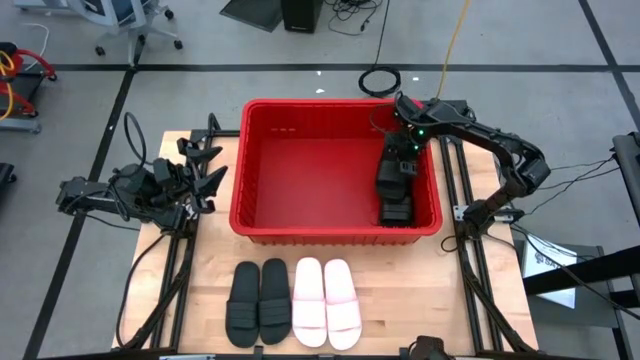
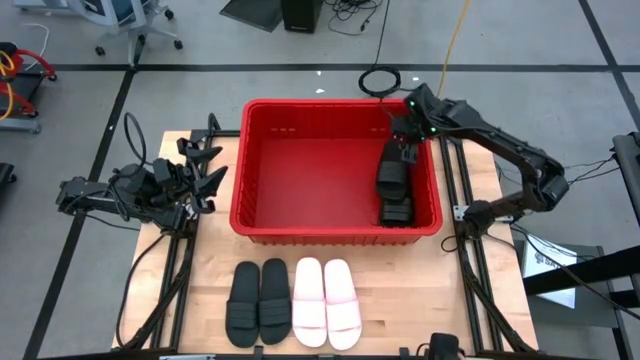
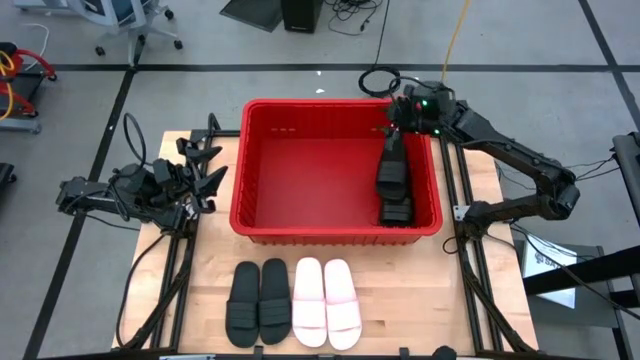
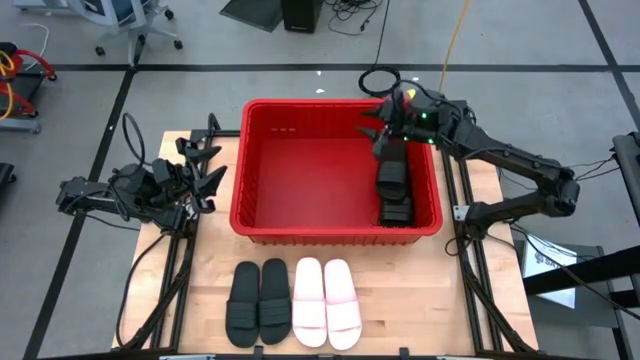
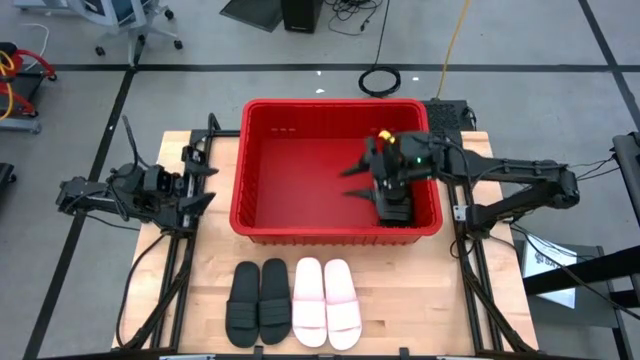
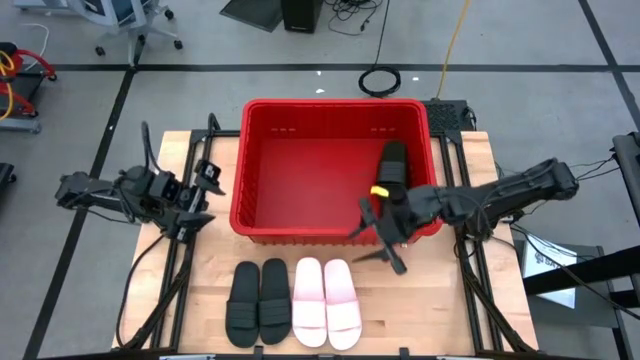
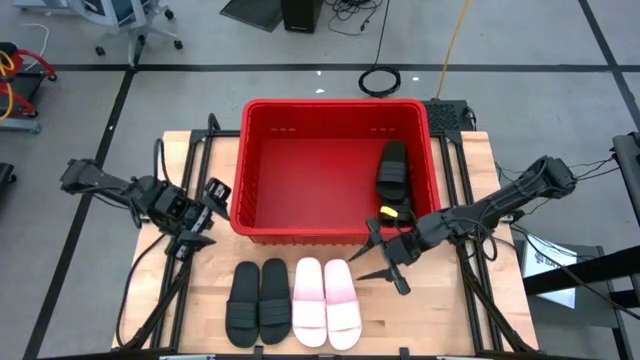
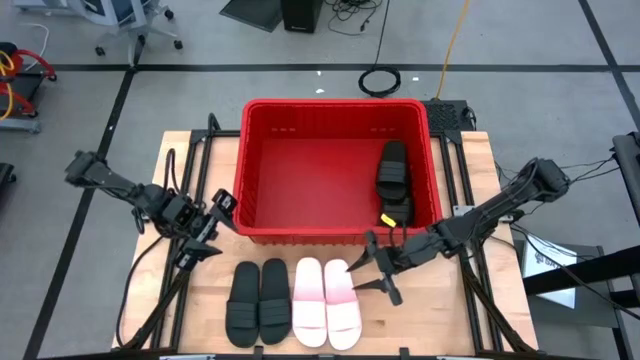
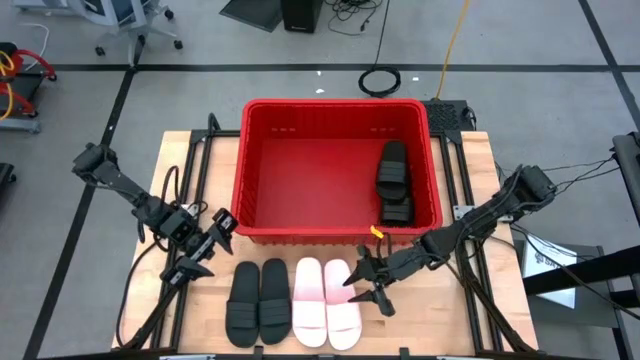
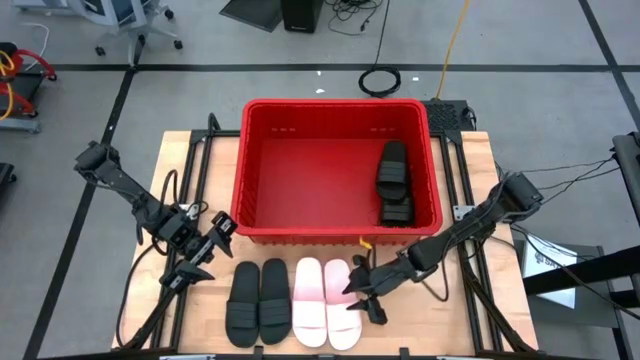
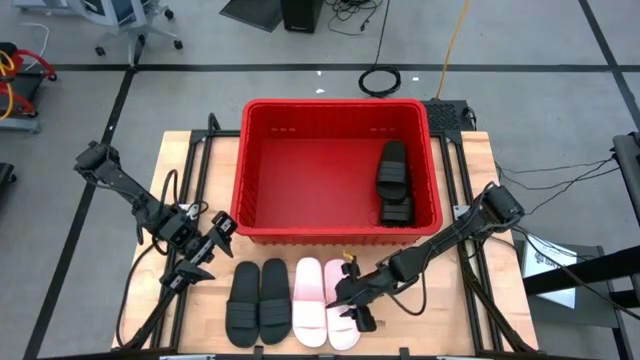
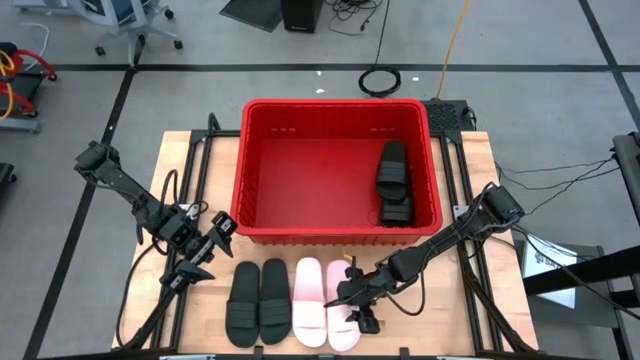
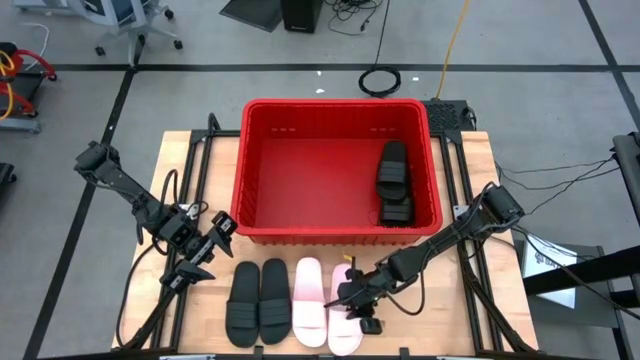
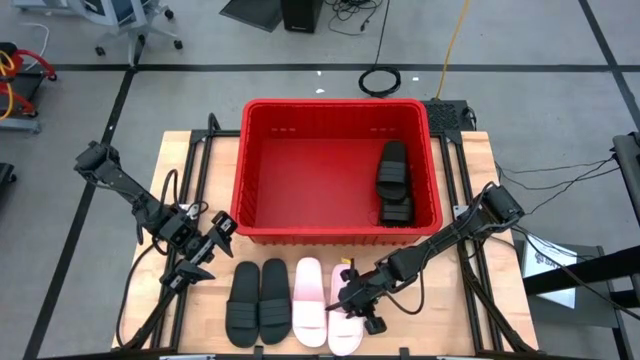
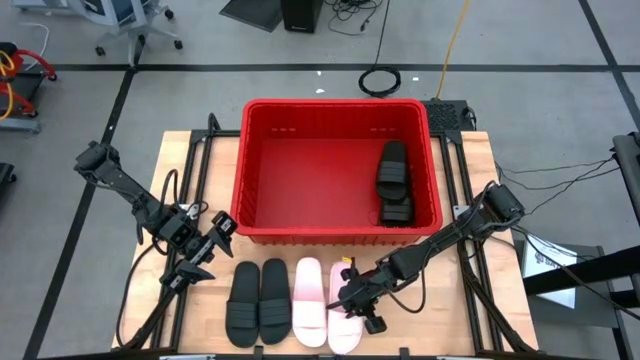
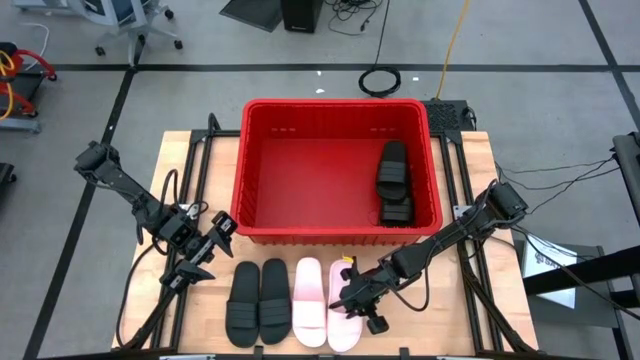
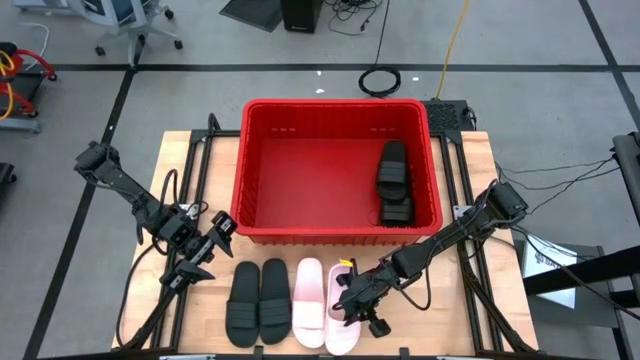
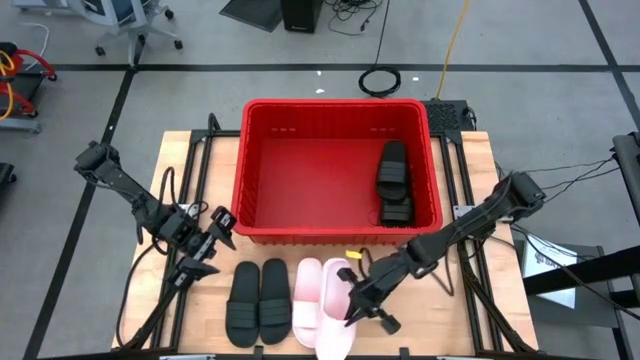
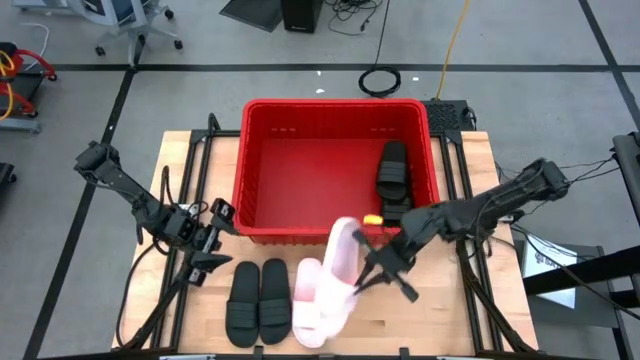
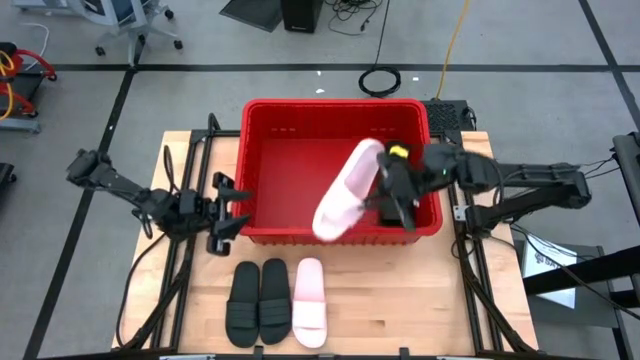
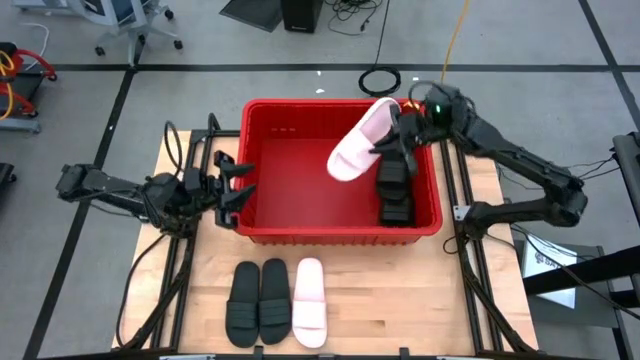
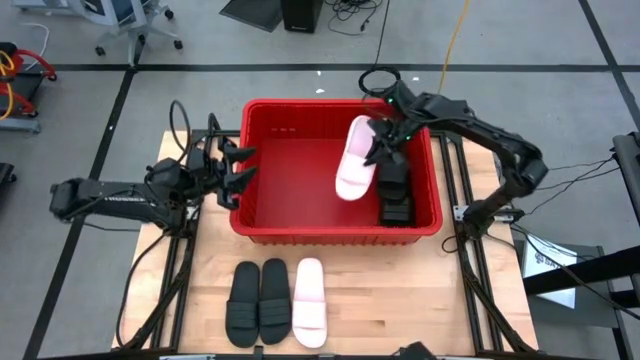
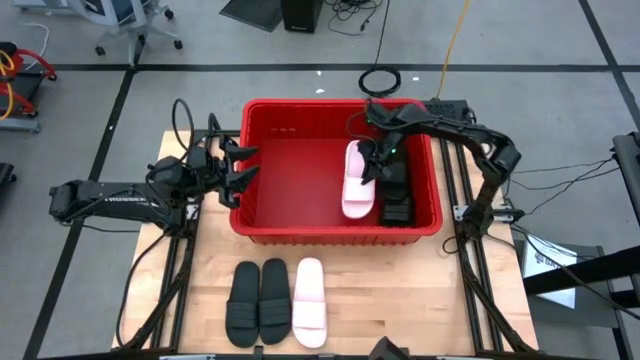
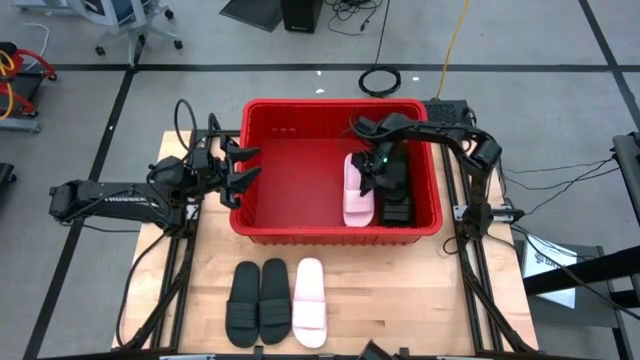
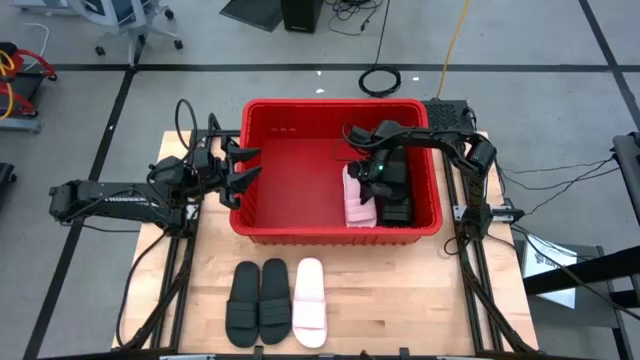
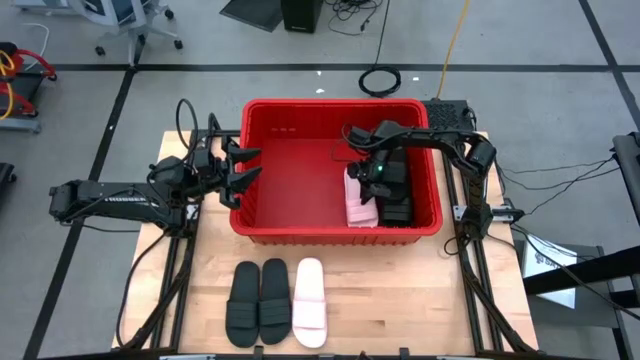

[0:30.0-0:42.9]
Task: Pick and place slides into bin
Put the right white slide into the red bin

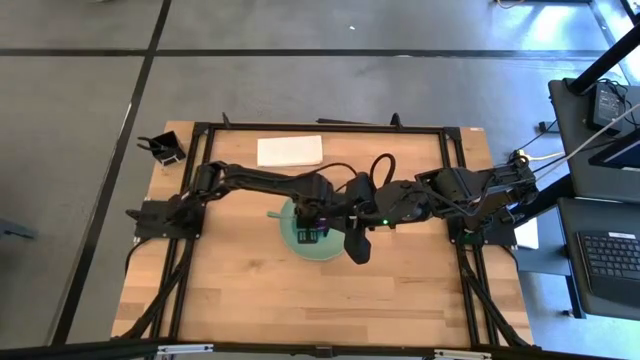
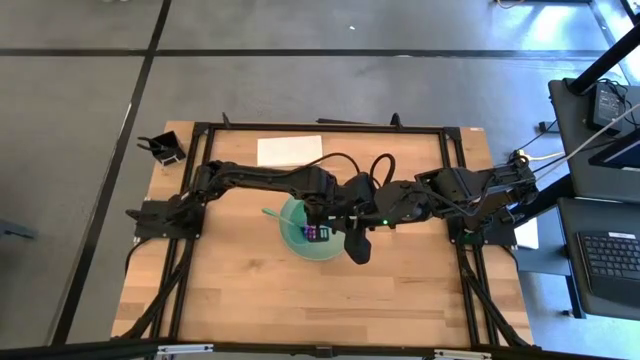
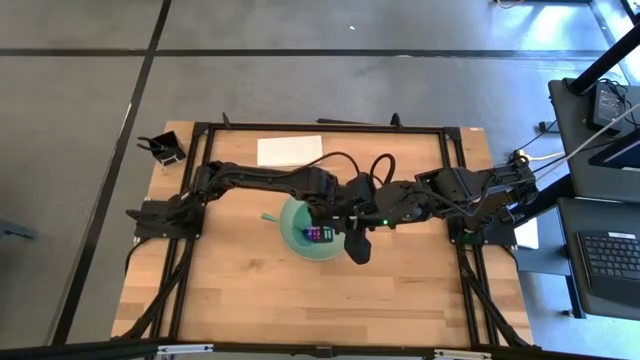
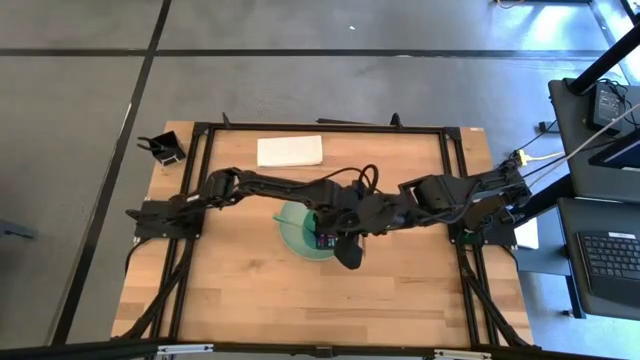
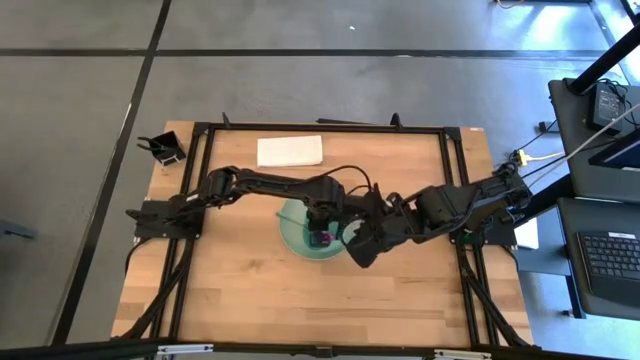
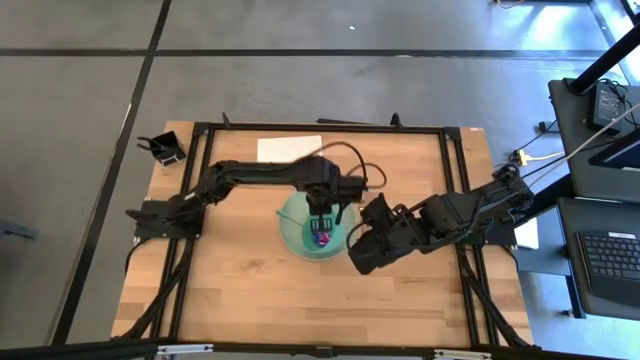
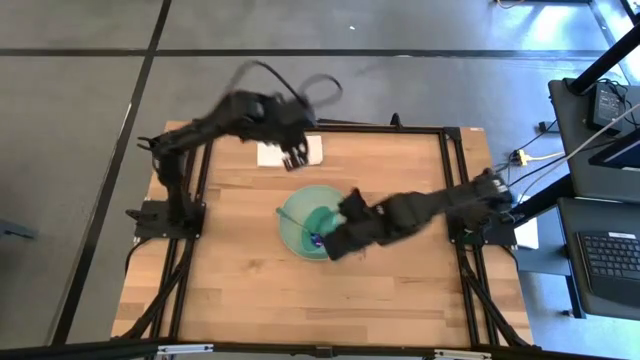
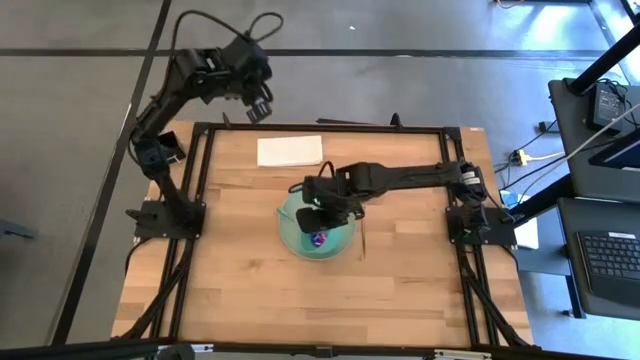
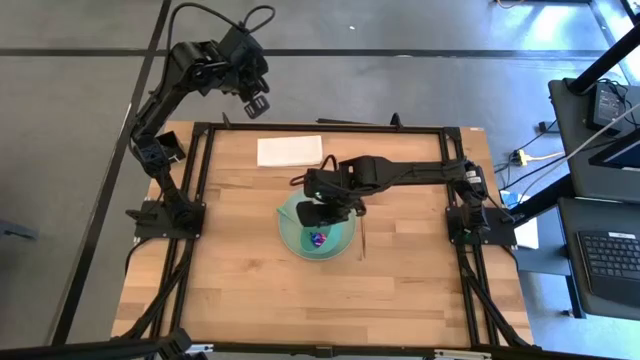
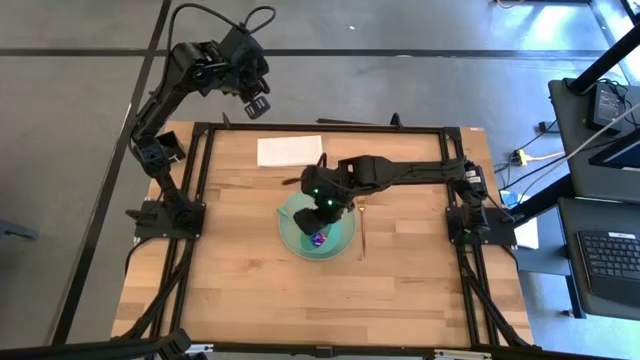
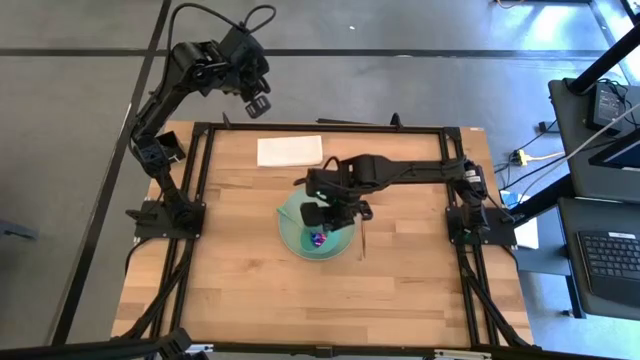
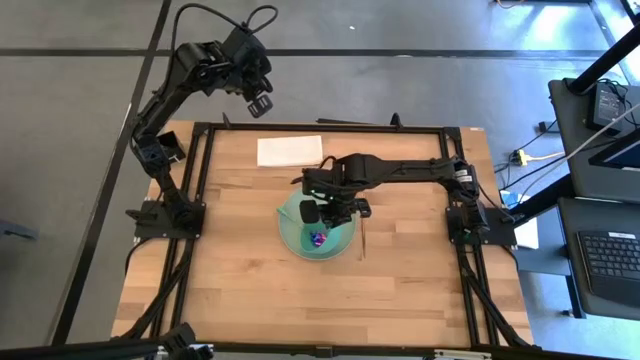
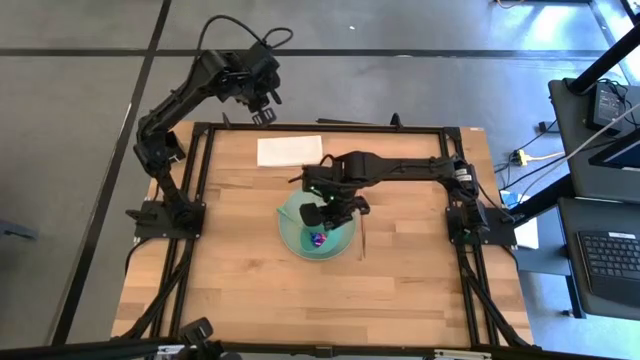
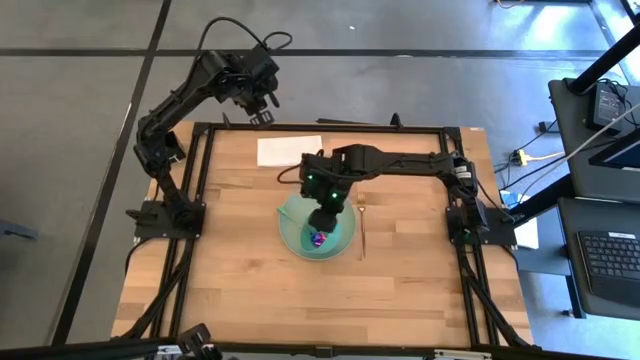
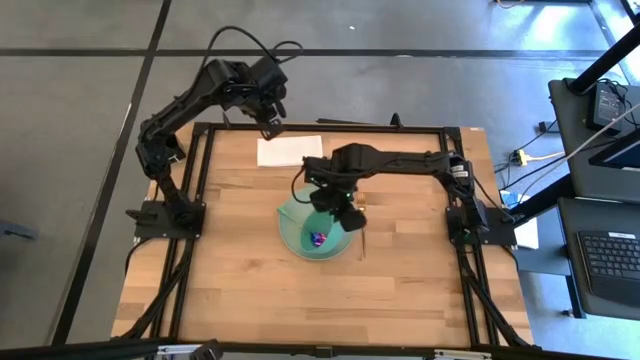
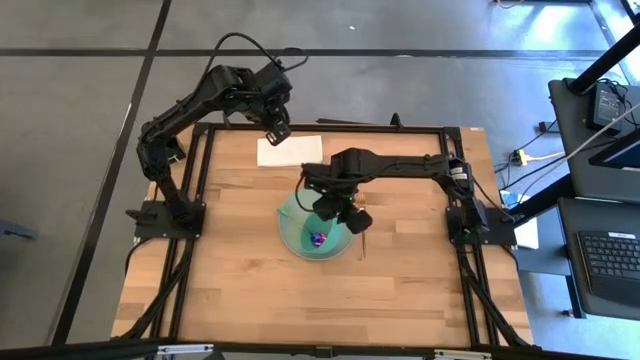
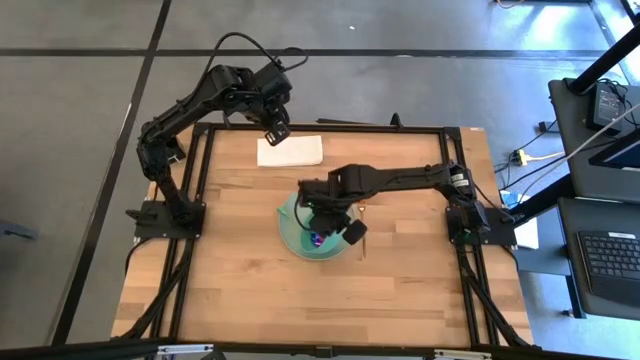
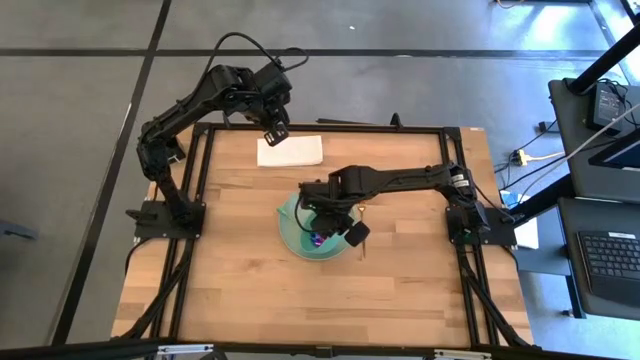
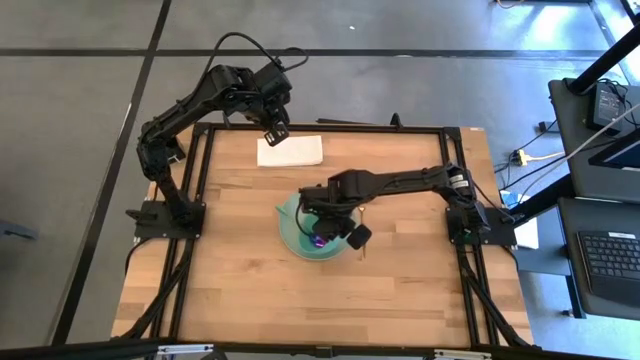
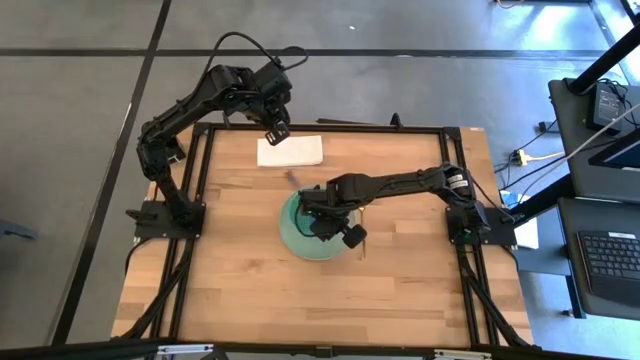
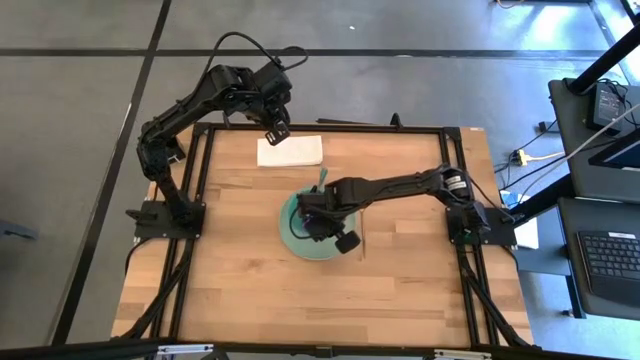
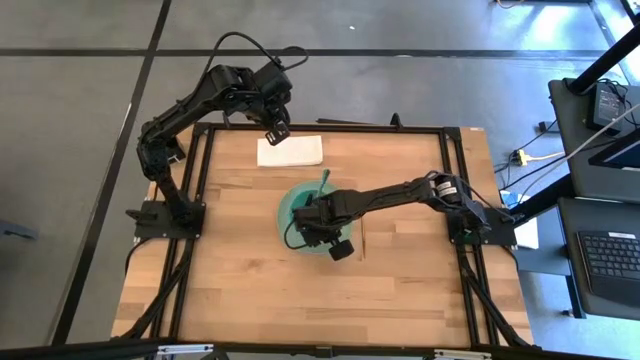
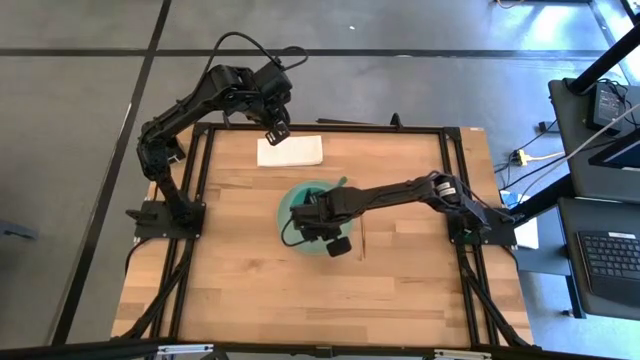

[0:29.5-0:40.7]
Task: Set table place
Adjust the blue bowl on the blue plate
